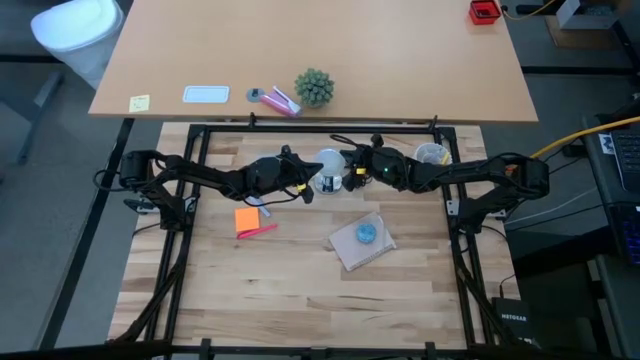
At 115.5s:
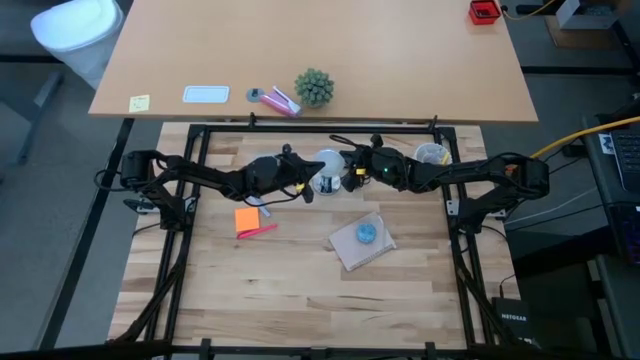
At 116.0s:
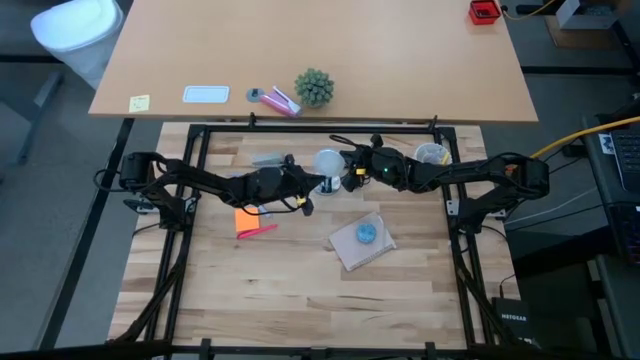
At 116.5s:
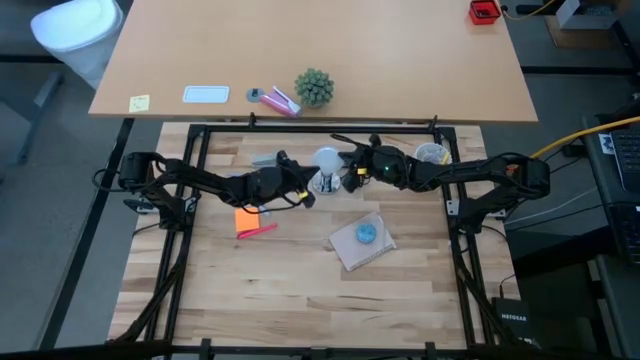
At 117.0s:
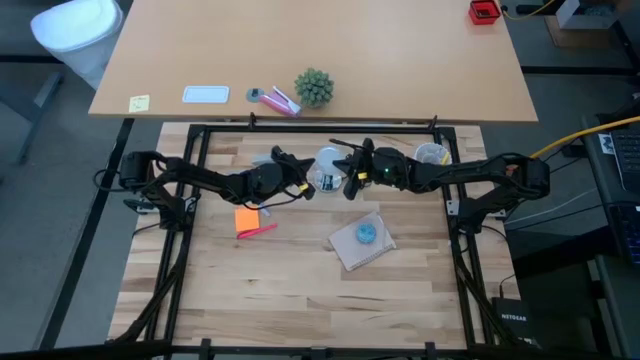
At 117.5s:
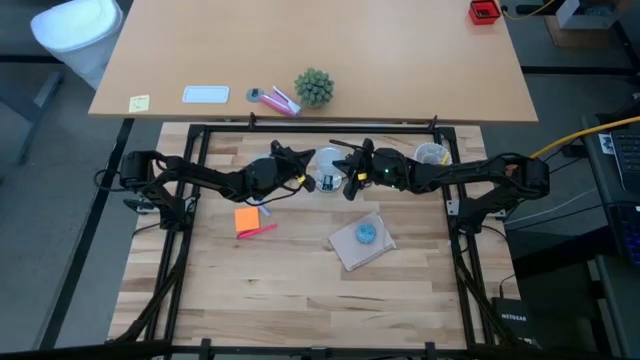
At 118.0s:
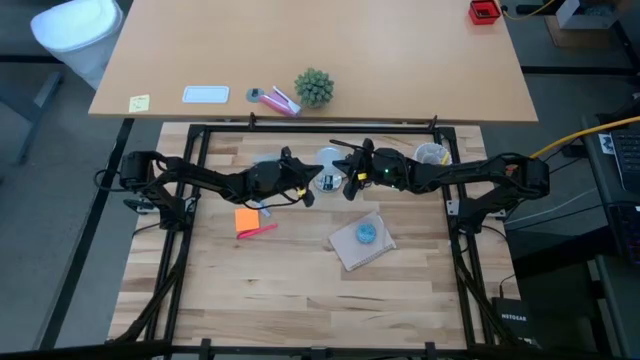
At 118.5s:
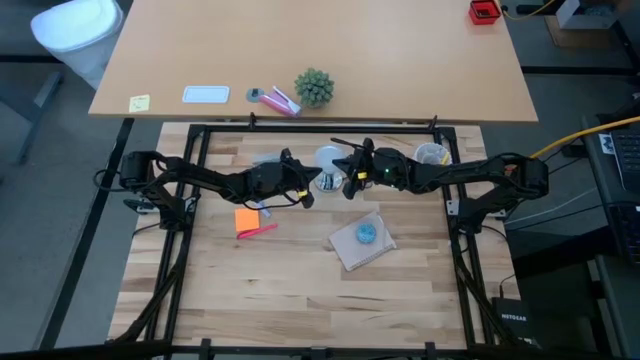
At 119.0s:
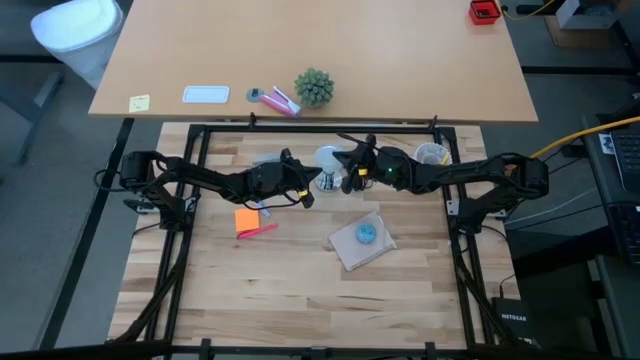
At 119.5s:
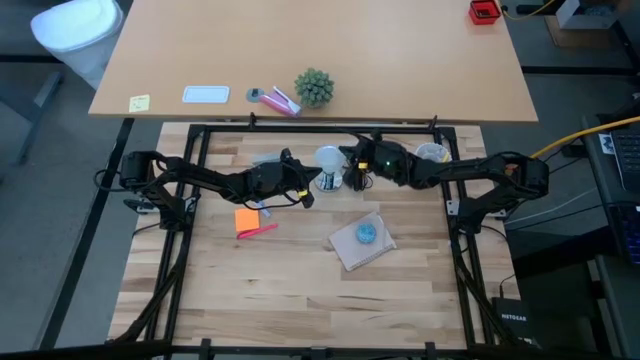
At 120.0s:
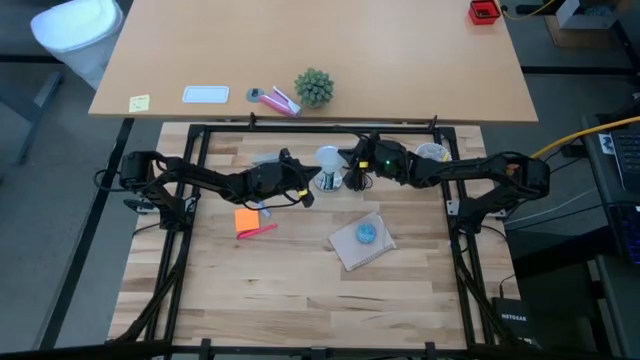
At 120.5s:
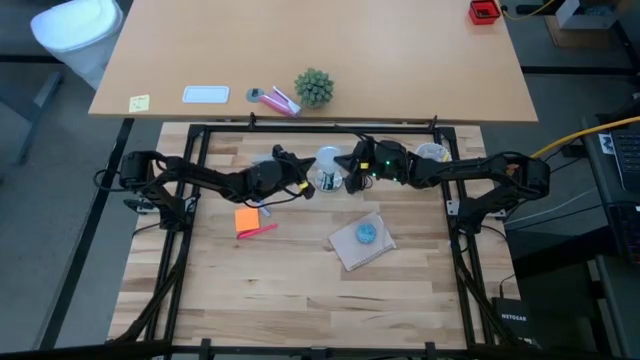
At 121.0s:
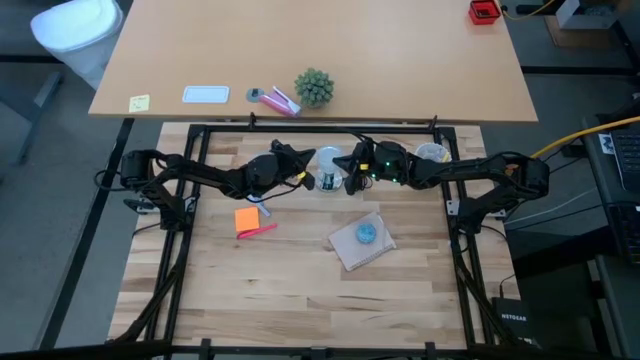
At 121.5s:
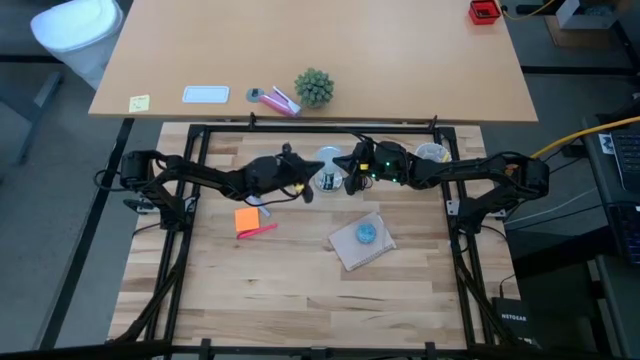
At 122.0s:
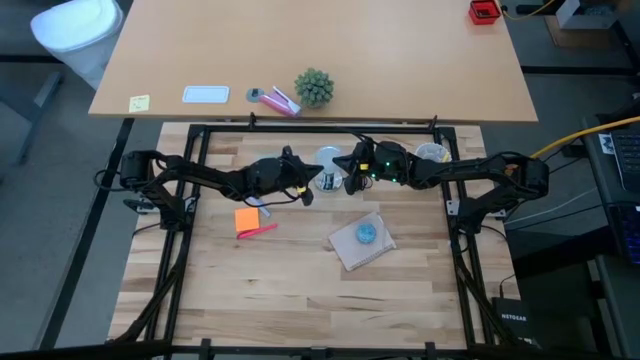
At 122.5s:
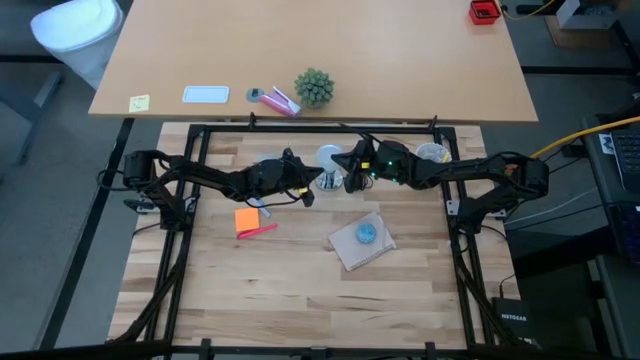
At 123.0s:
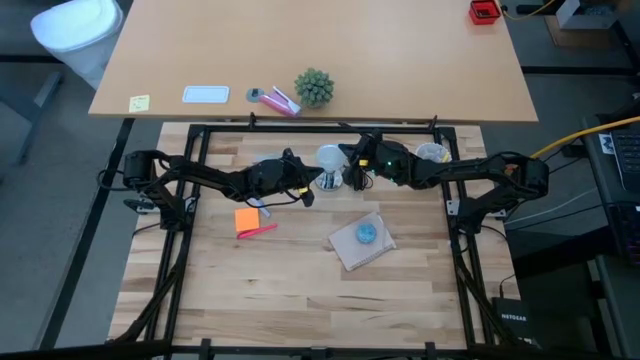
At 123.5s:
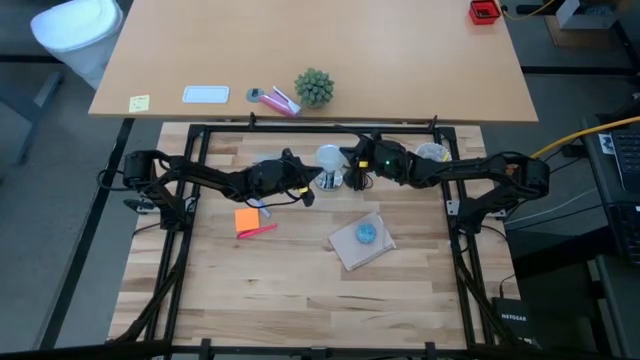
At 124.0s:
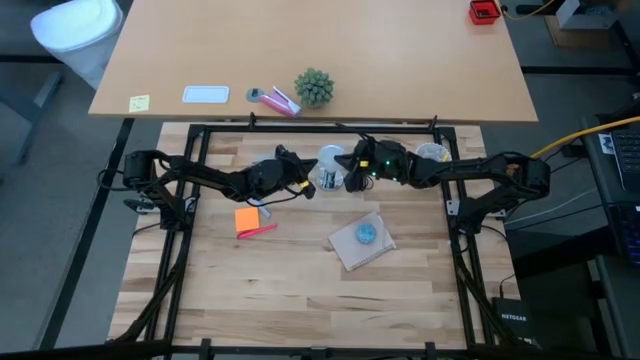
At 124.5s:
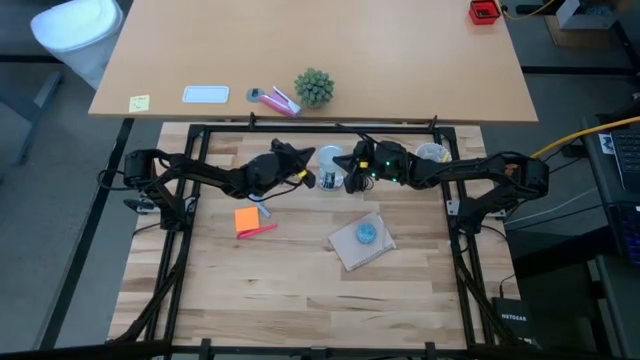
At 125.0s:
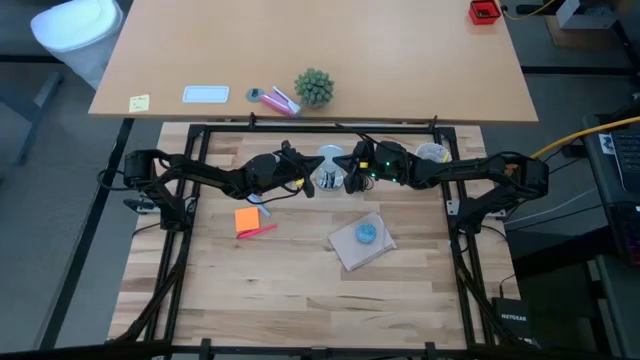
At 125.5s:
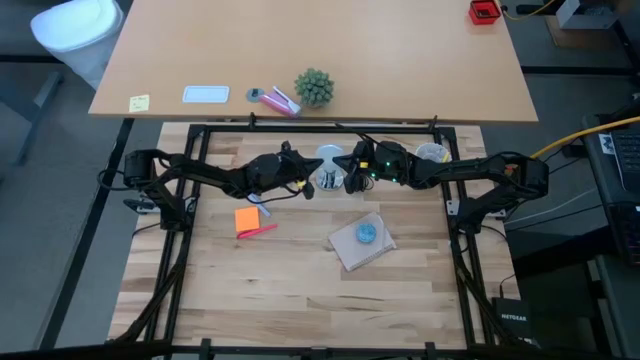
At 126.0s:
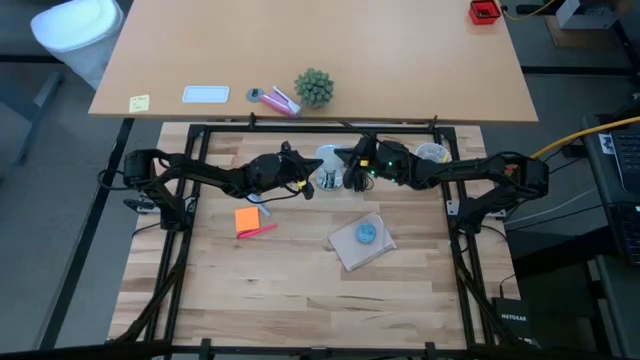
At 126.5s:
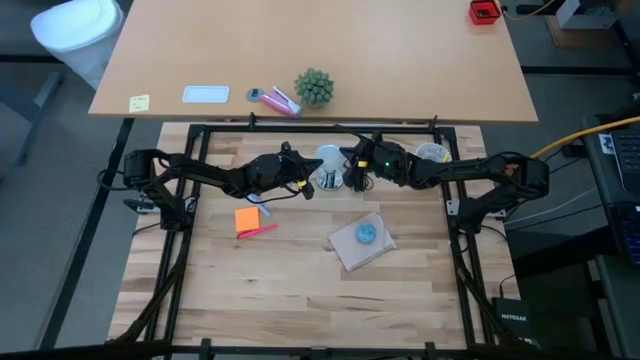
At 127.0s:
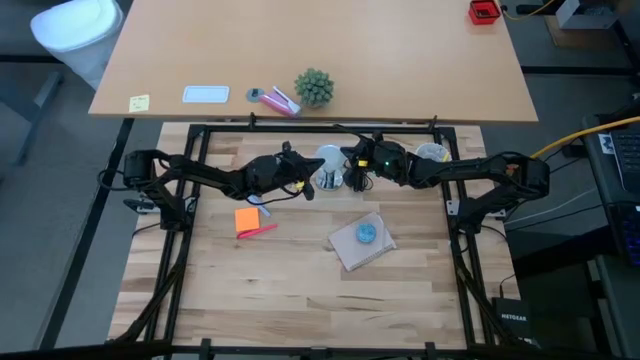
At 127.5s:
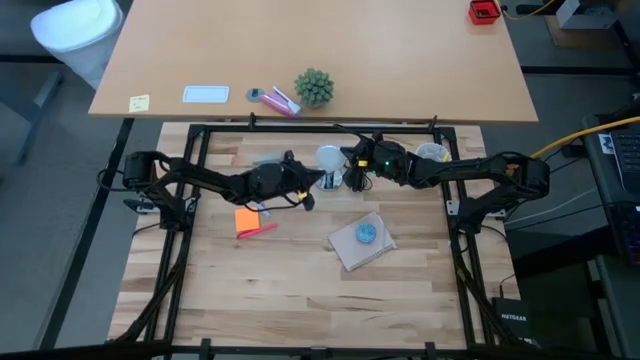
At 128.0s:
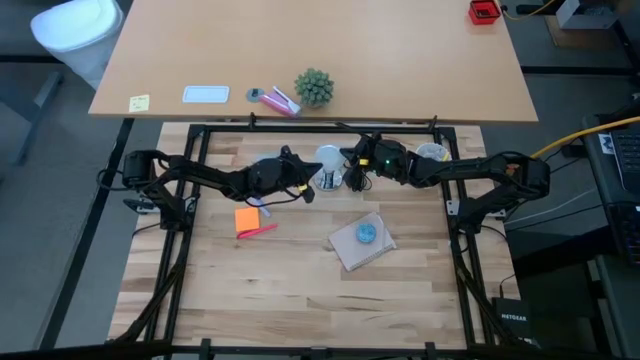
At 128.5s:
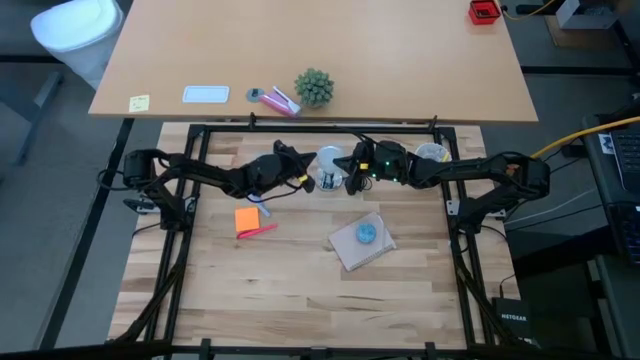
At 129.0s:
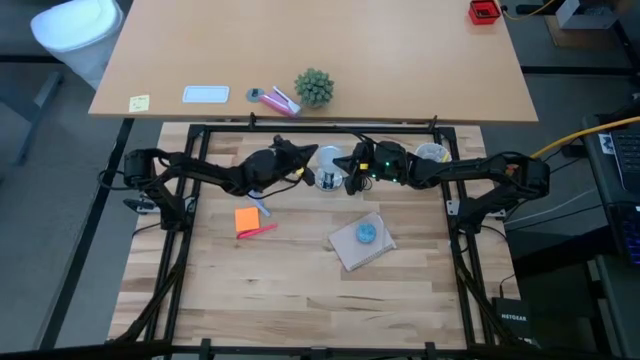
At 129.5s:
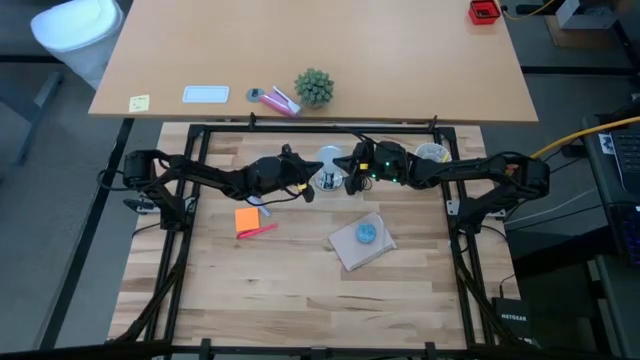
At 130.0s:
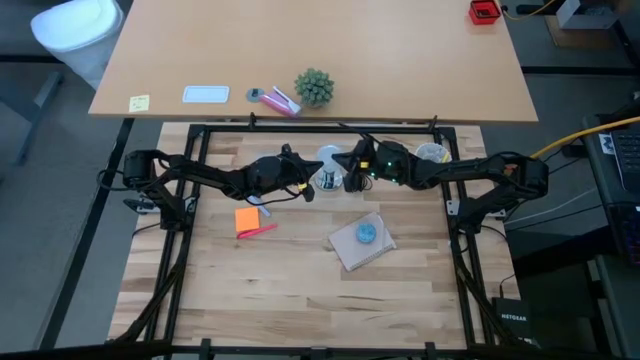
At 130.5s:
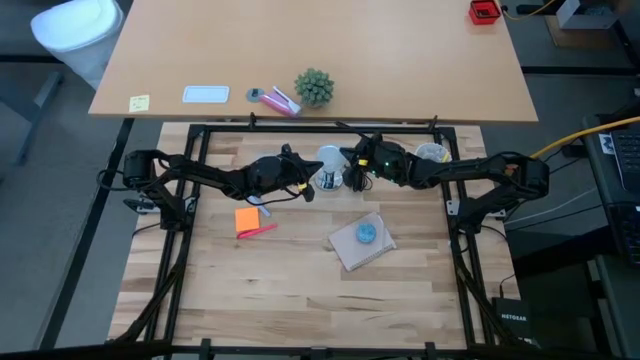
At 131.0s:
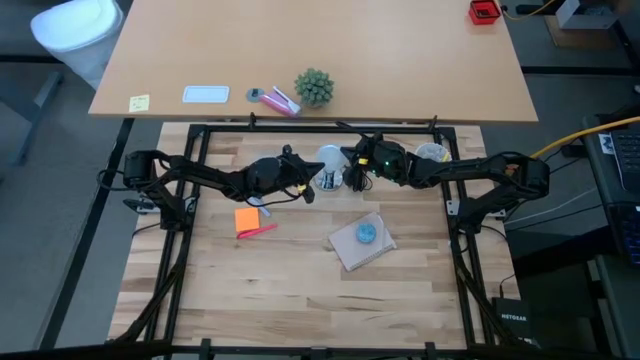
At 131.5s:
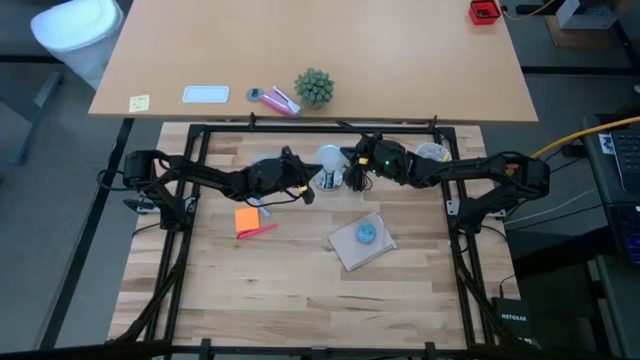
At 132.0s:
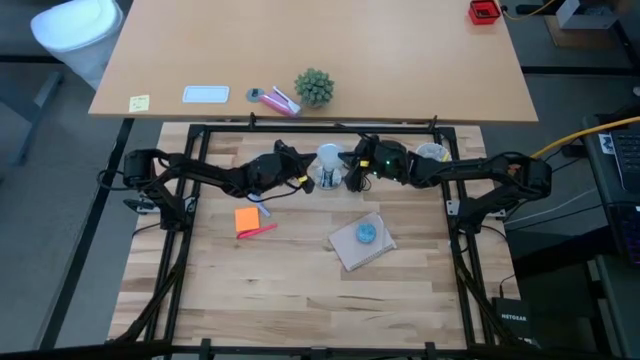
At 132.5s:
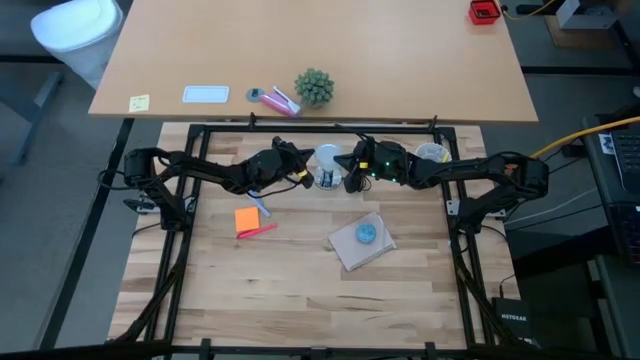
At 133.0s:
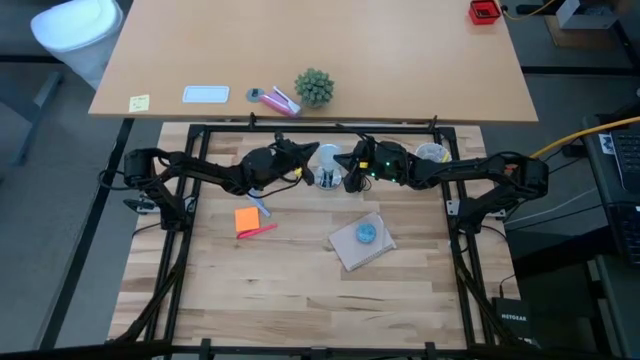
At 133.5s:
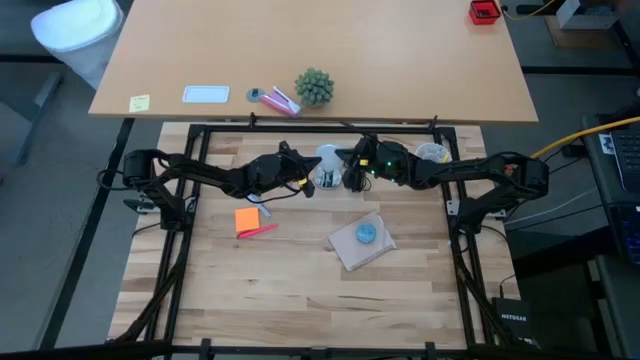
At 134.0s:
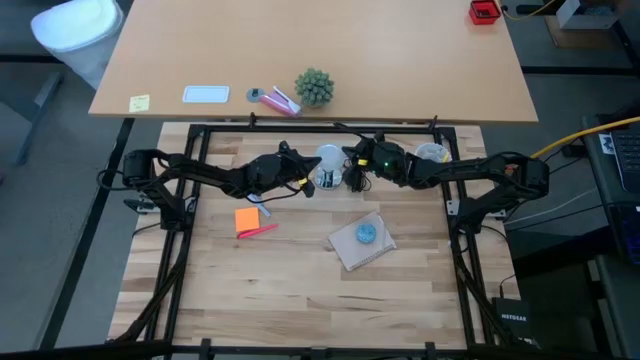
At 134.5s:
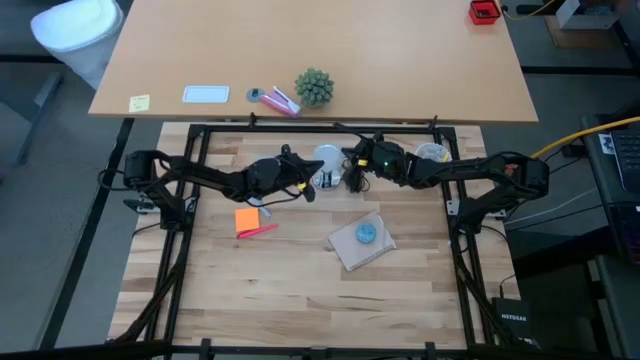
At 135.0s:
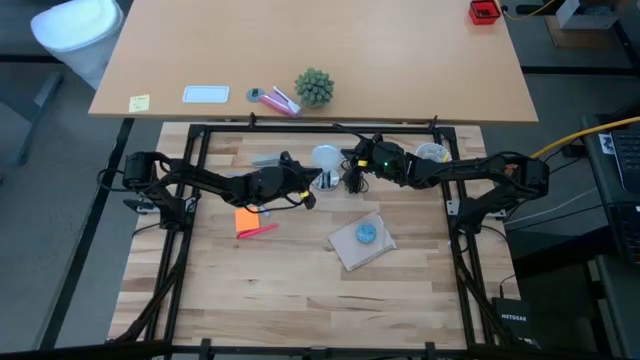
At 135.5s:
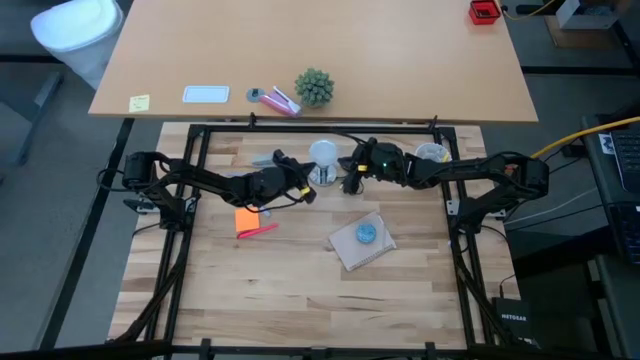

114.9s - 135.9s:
Task: Screw lightbulb
Insert the lightbulb into the lamp
